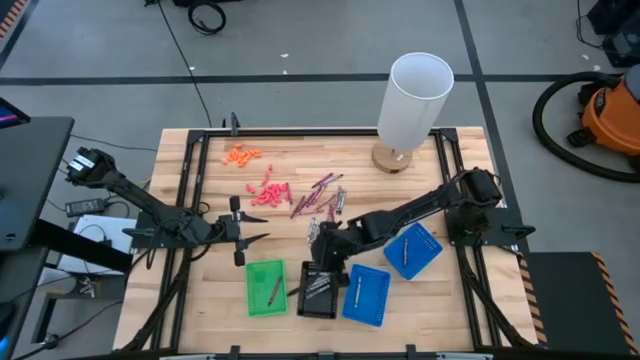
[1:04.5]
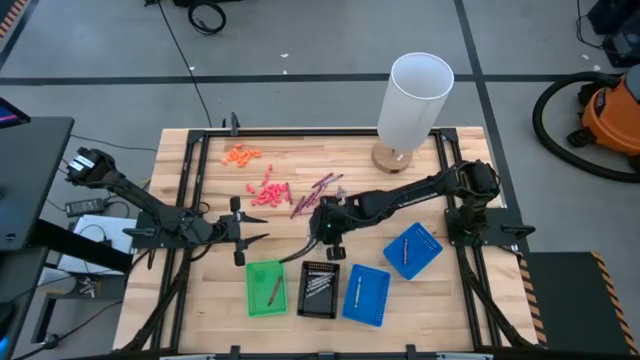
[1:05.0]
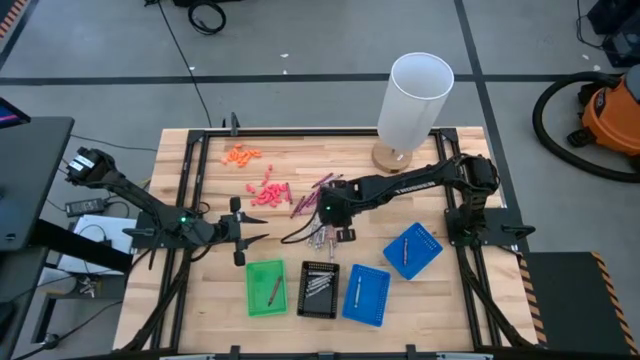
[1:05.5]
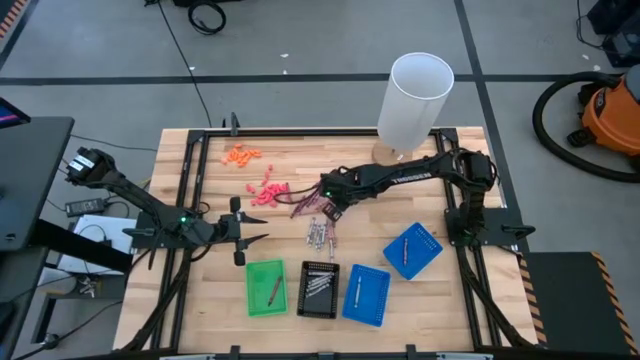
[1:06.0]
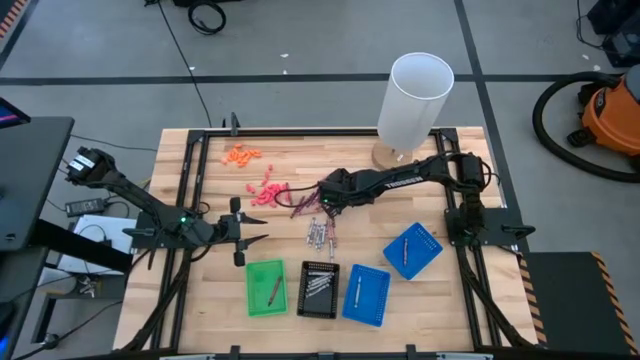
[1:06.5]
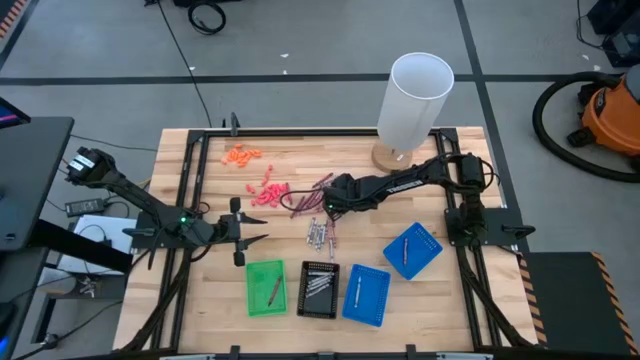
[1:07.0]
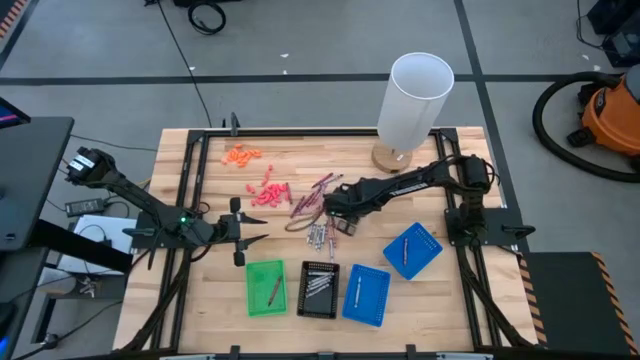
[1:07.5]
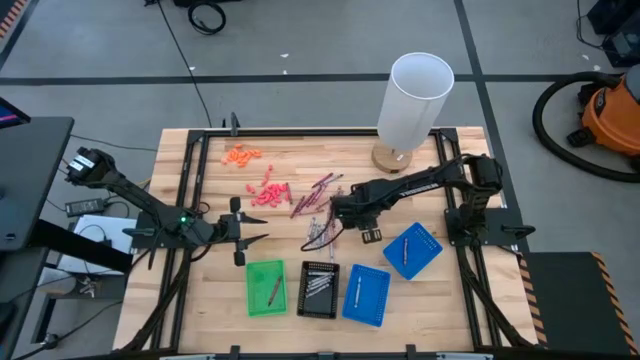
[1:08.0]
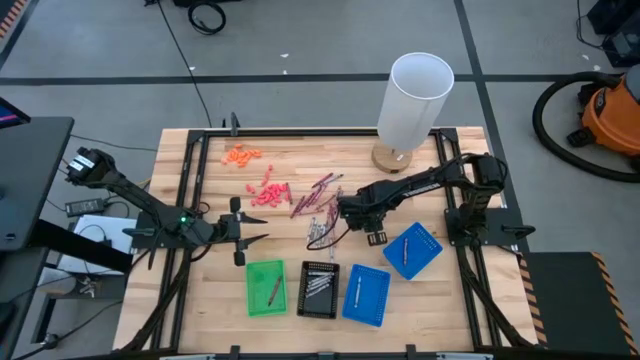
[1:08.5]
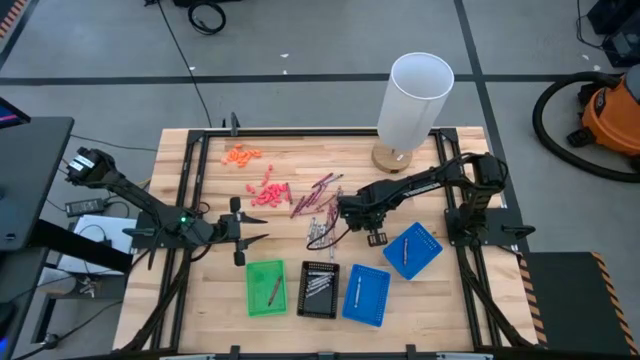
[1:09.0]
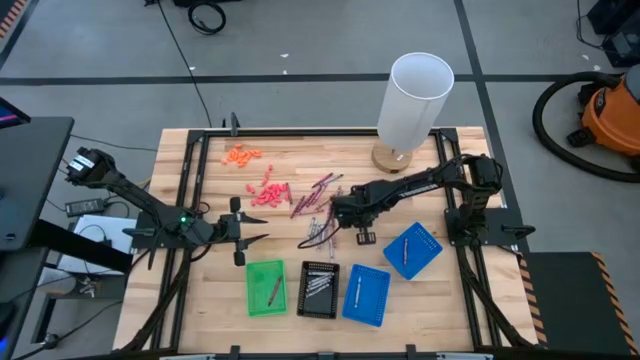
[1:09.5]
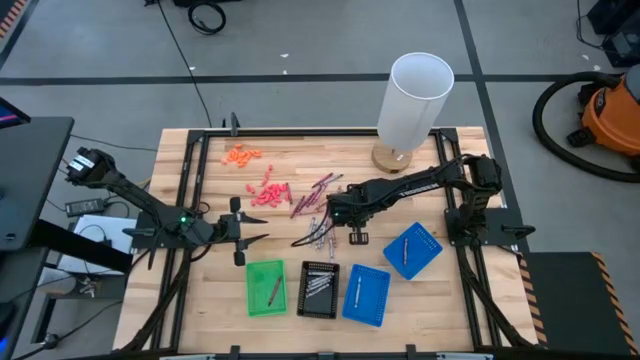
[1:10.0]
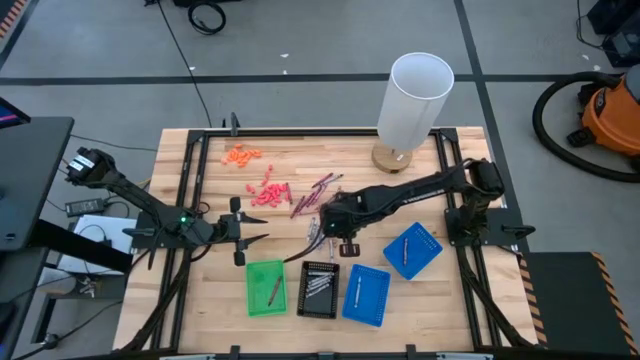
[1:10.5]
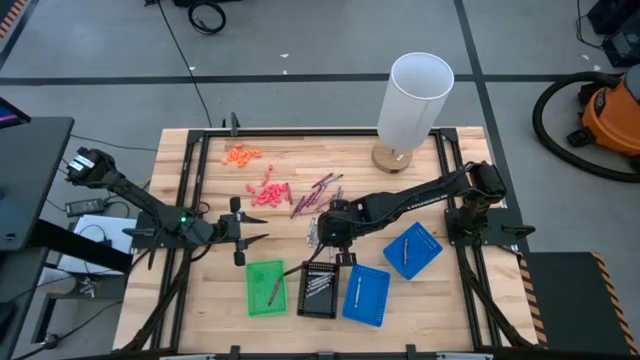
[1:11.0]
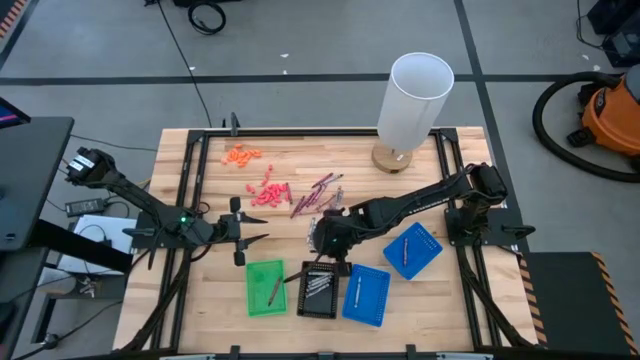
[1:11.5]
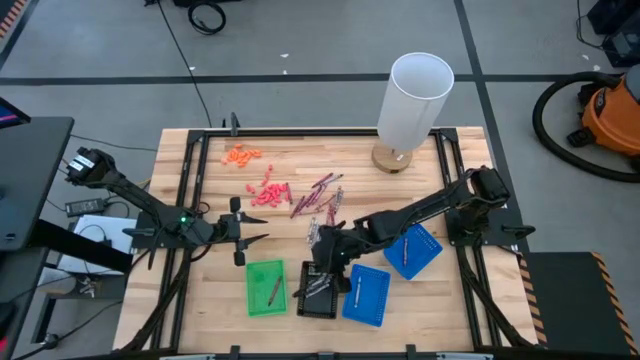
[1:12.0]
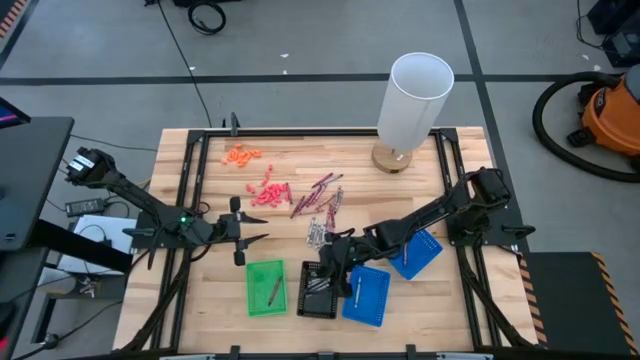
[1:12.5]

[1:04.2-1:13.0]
Task: Sort crayons
Put the black crayon into the black basket

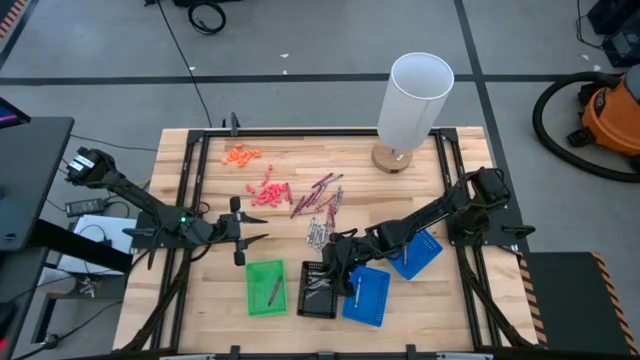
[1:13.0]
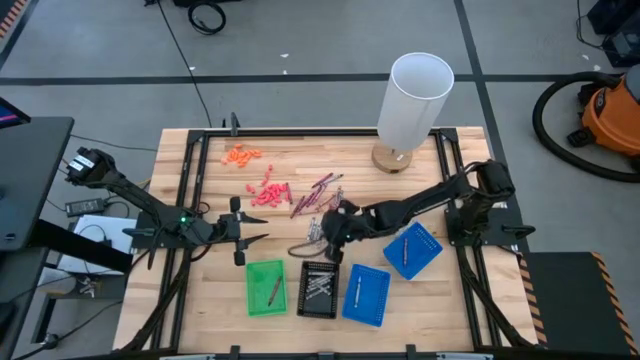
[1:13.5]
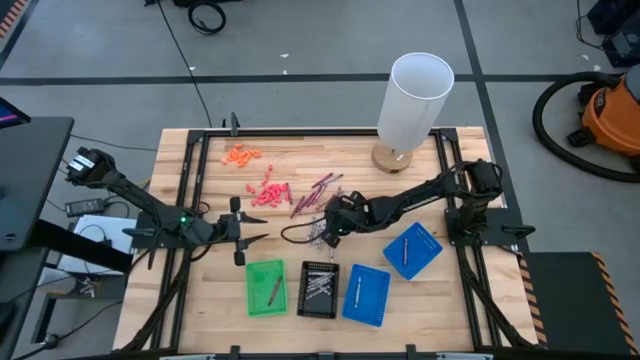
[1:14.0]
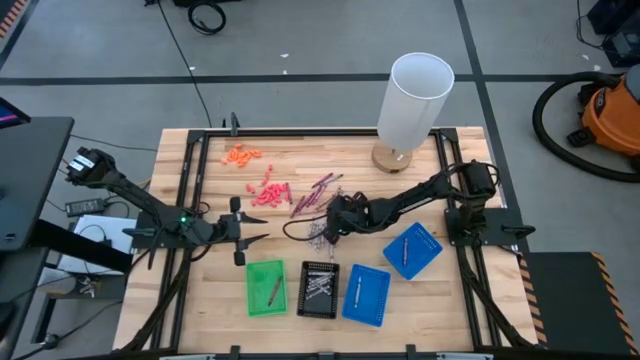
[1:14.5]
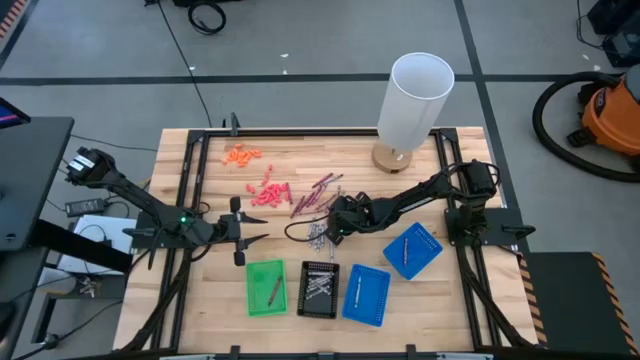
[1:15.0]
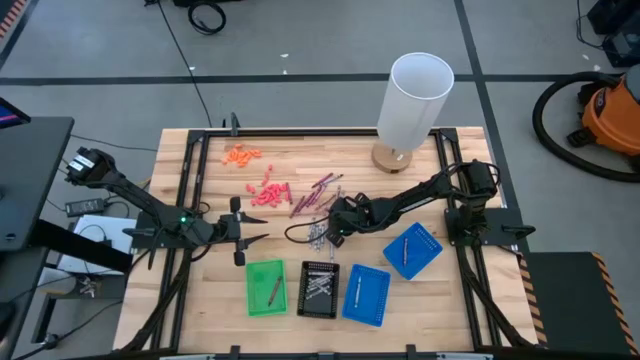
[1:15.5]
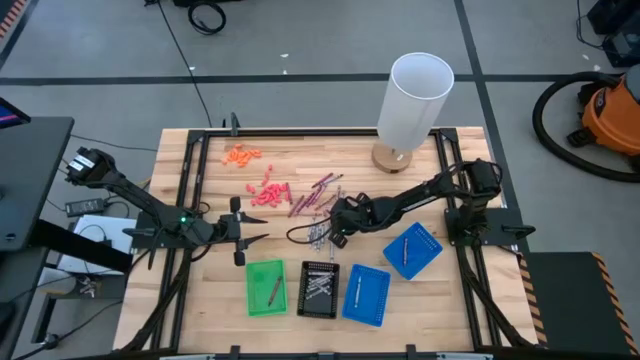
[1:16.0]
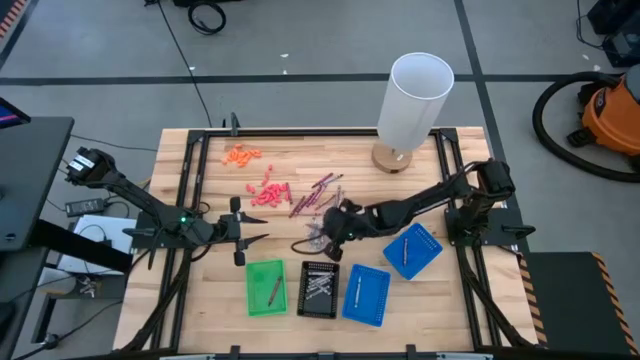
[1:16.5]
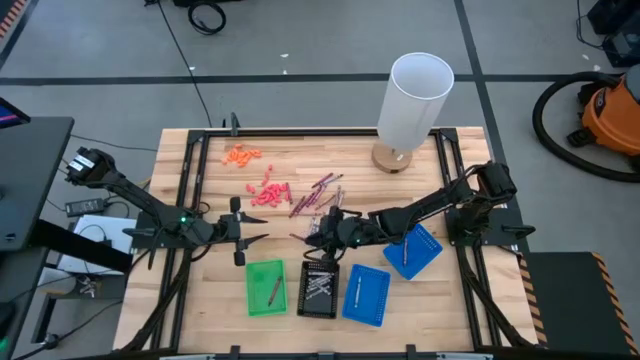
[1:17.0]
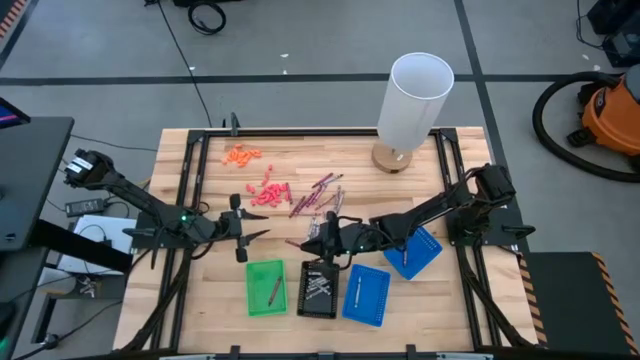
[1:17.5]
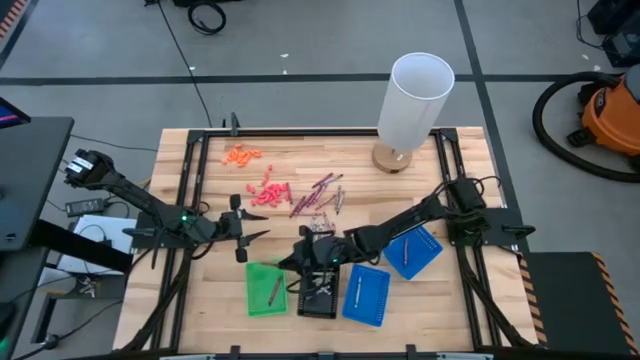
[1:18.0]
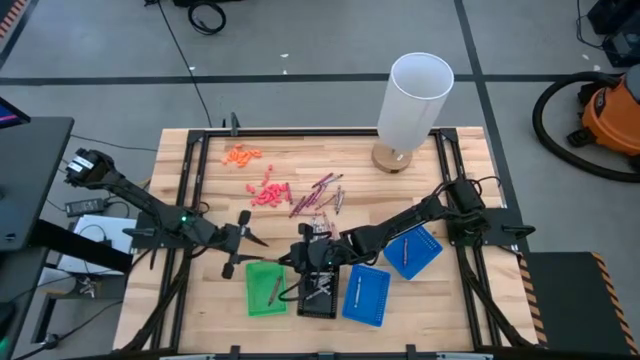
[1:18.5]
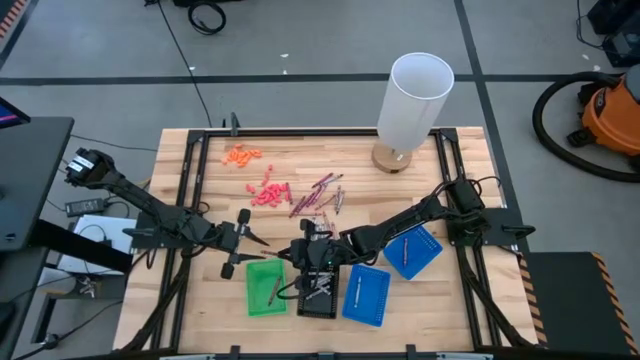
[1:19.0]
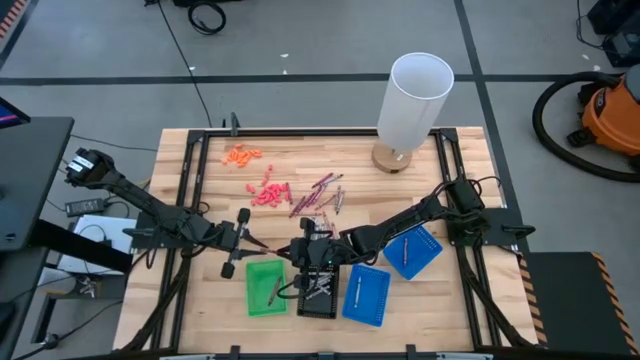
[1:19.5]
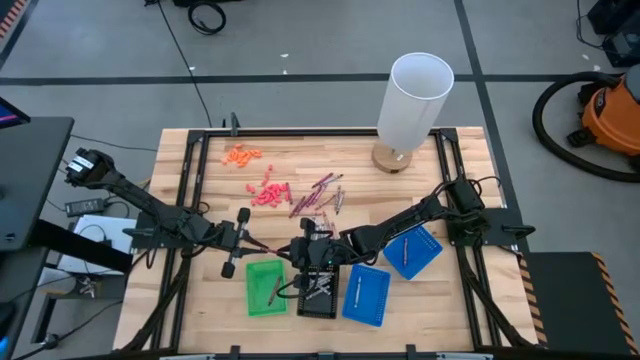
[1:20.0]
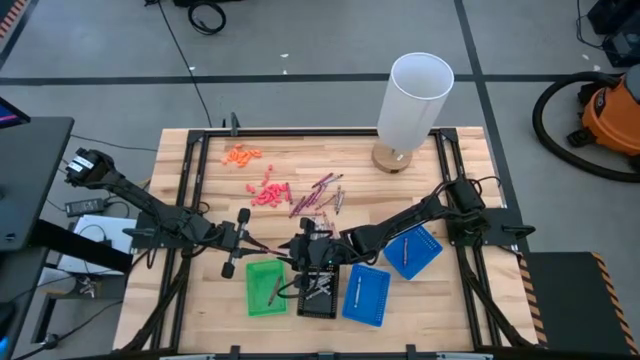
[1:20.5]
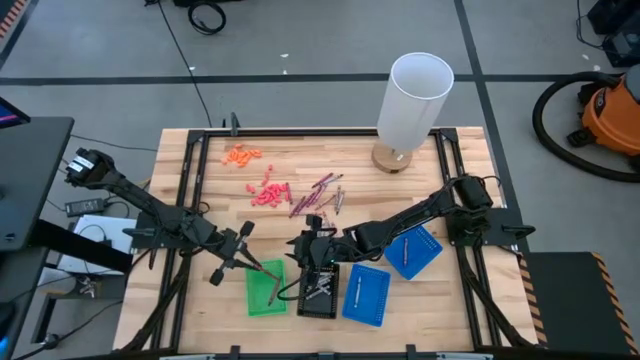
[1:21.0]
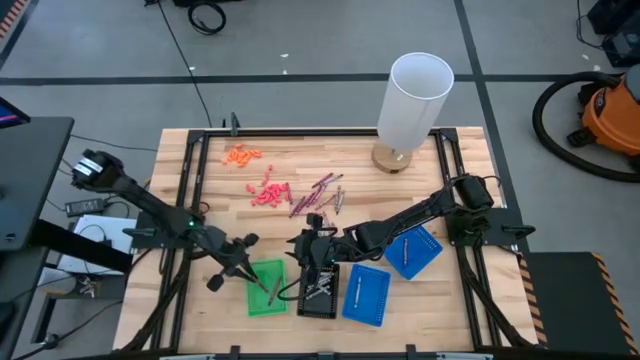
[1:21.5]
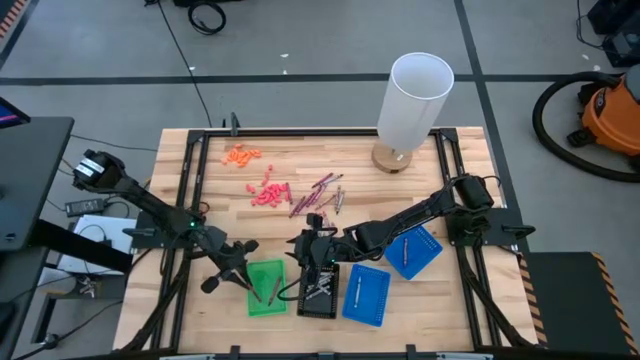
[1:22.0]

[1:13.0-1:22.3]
Put the red crayon into the green basket

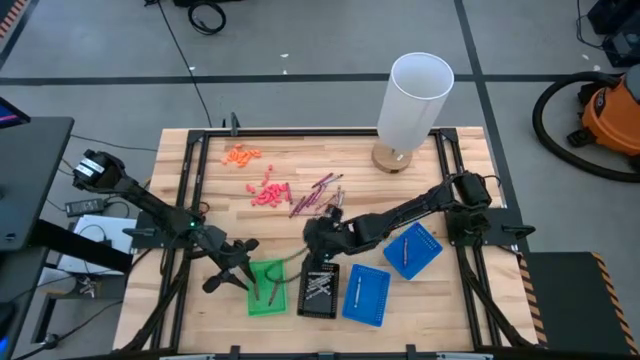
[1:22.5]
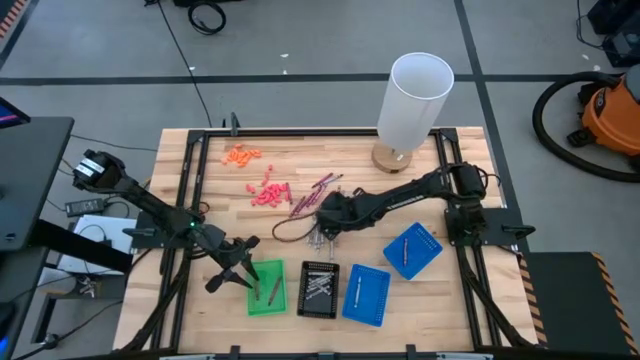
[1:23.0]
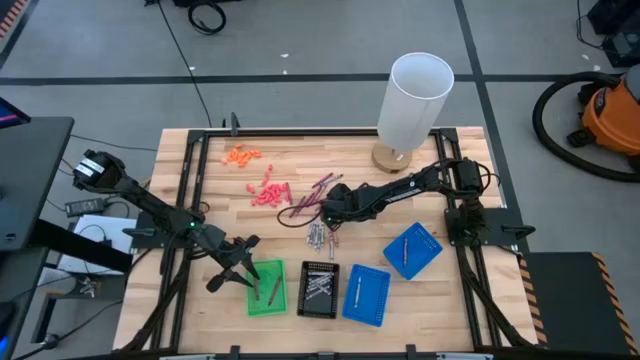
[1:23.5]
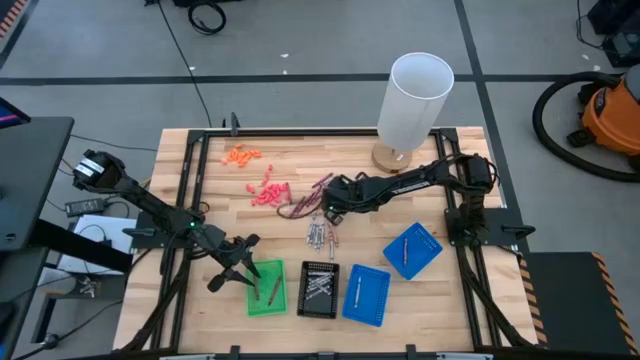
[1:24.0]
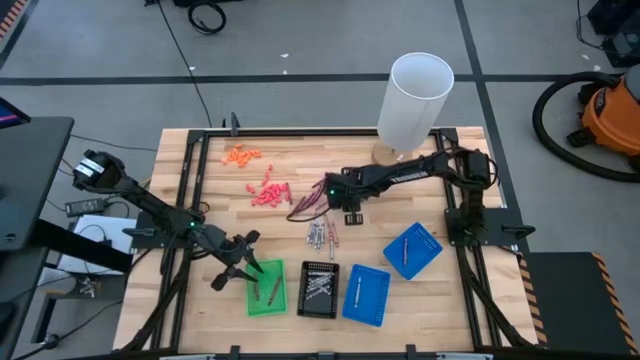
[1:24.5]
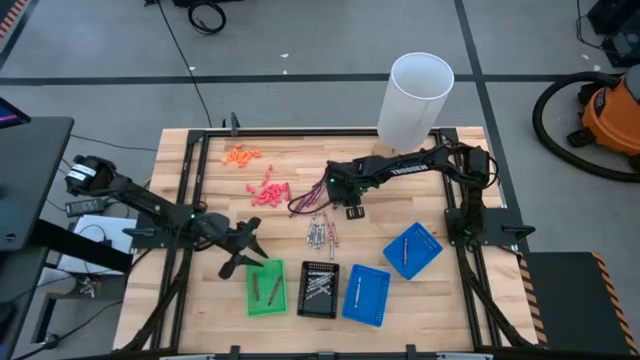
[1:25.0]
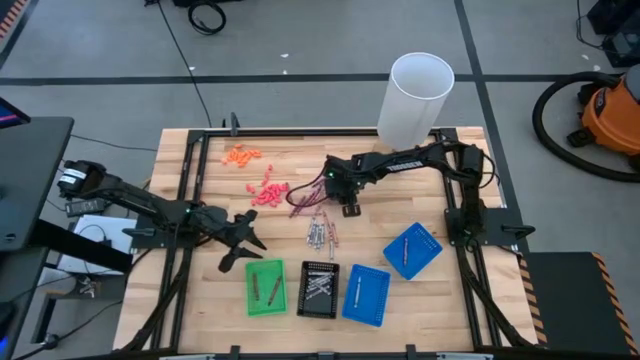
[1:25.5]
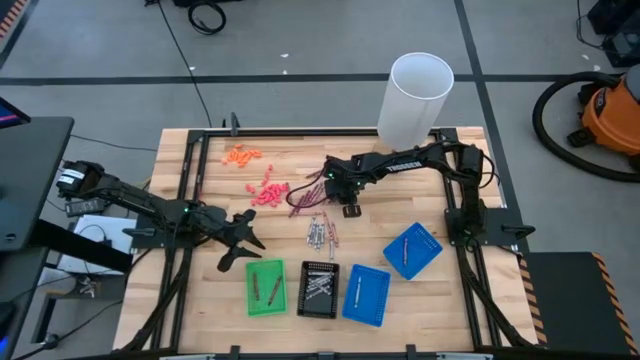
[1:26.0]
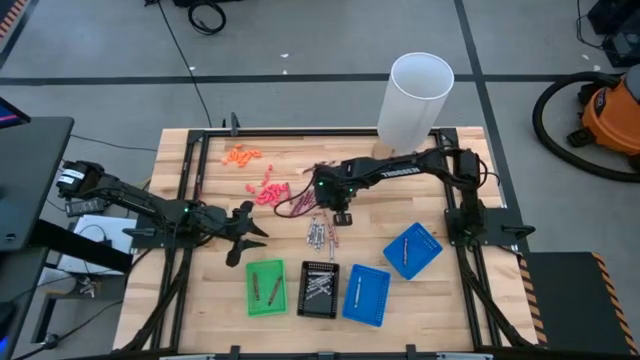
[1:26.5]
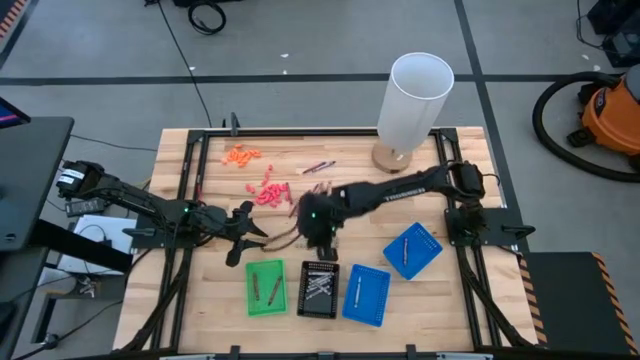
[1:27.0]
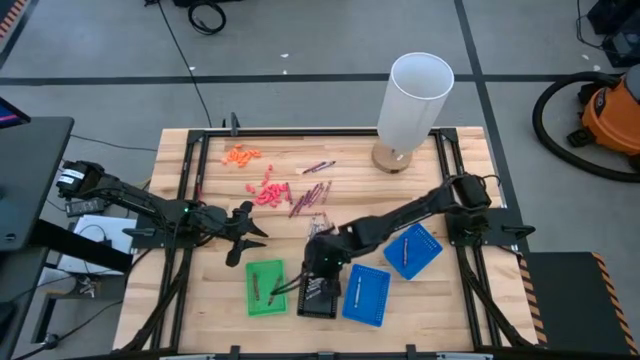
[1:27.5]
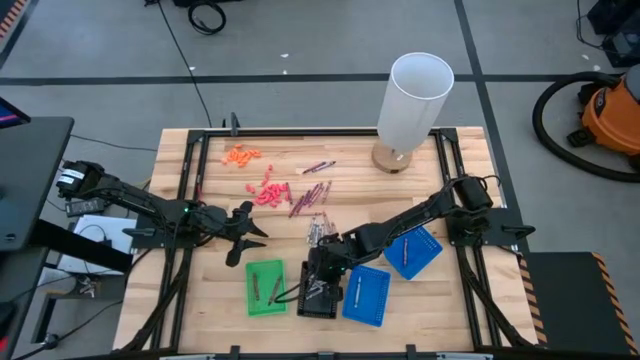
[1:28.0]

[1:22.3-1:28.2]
Put the black crayon into the black basket
